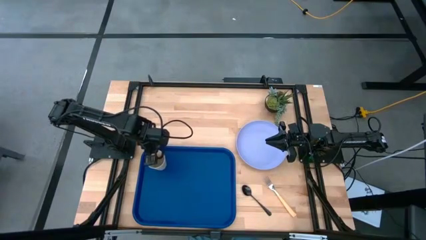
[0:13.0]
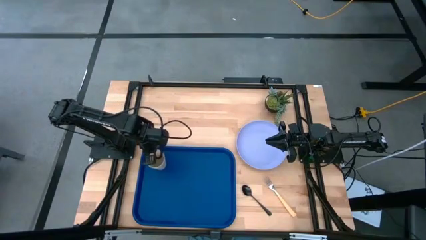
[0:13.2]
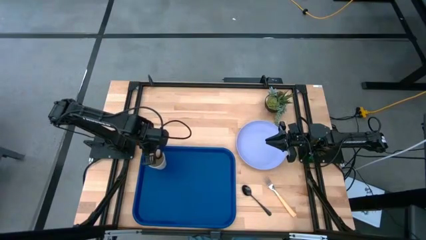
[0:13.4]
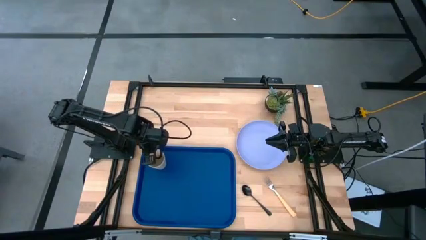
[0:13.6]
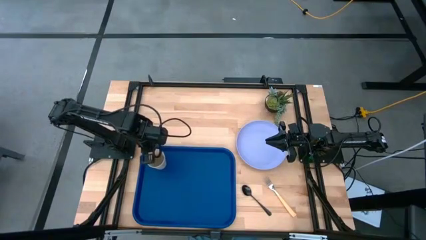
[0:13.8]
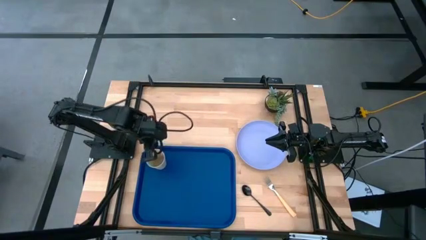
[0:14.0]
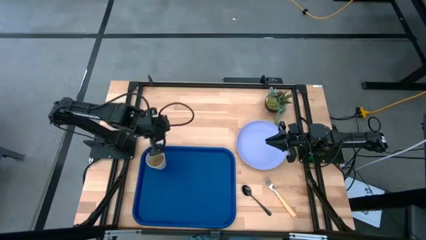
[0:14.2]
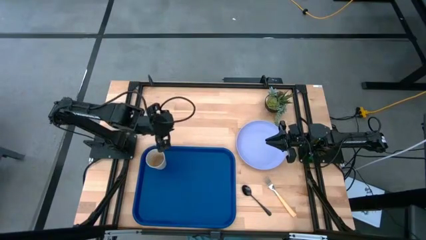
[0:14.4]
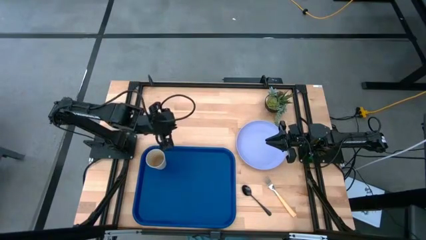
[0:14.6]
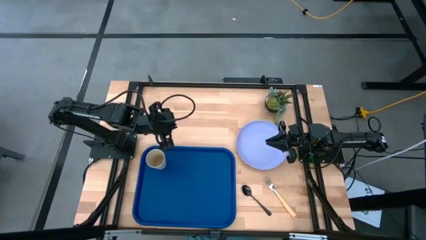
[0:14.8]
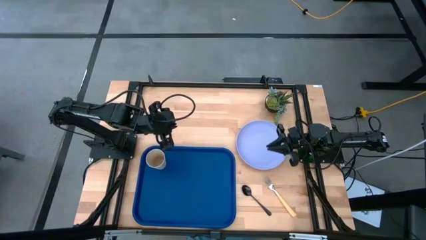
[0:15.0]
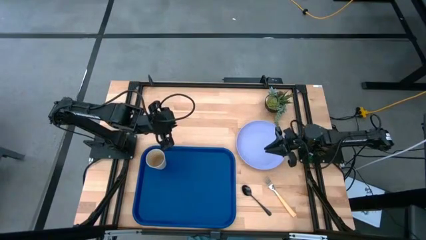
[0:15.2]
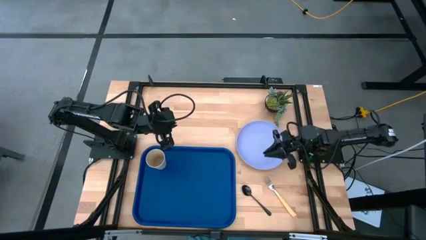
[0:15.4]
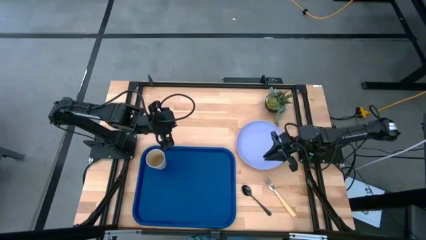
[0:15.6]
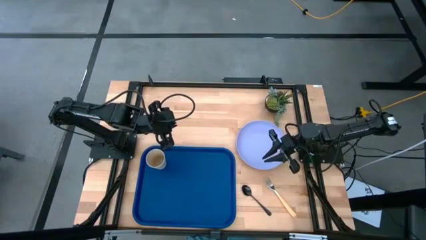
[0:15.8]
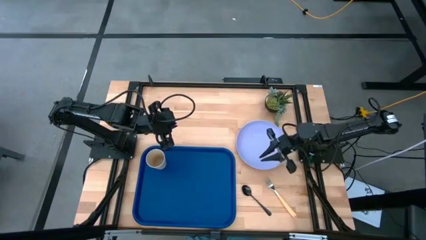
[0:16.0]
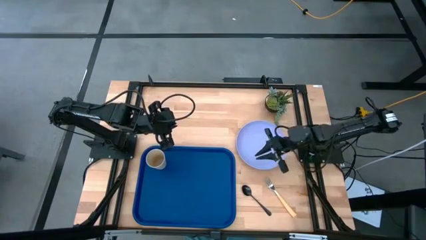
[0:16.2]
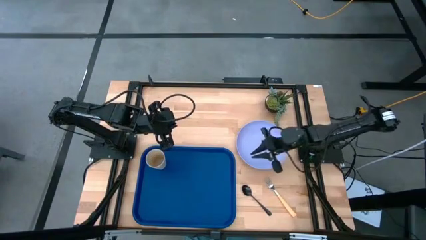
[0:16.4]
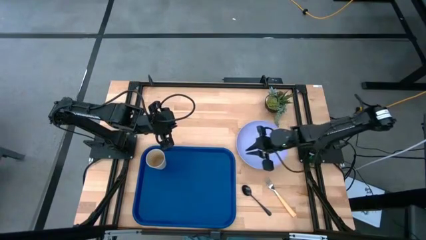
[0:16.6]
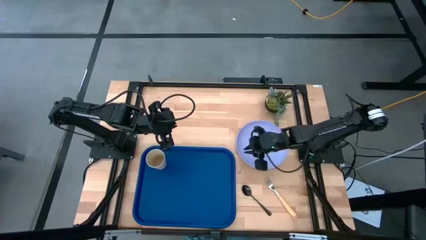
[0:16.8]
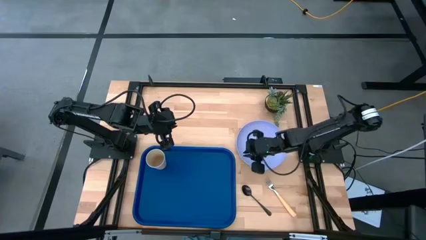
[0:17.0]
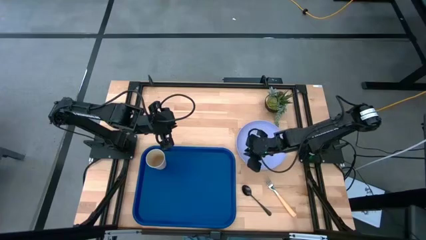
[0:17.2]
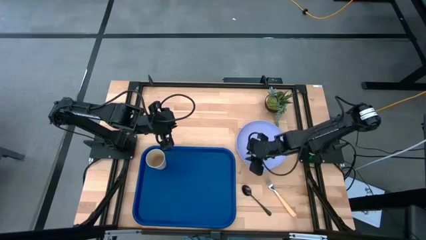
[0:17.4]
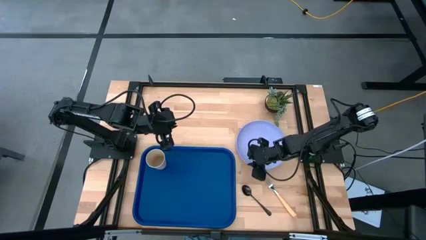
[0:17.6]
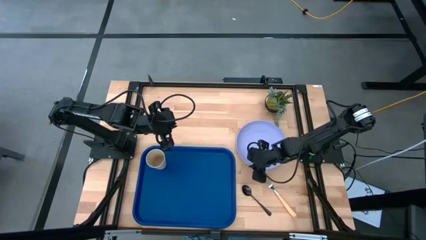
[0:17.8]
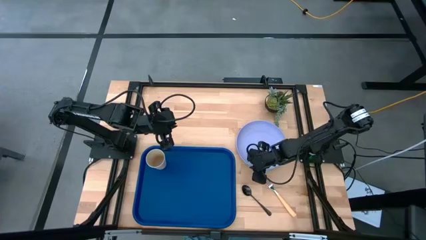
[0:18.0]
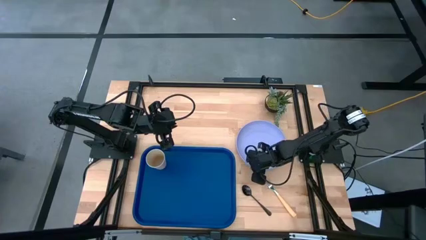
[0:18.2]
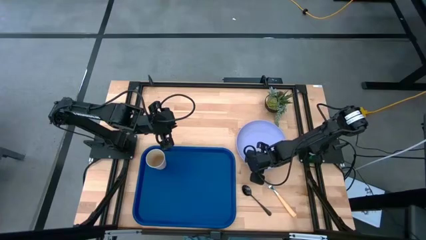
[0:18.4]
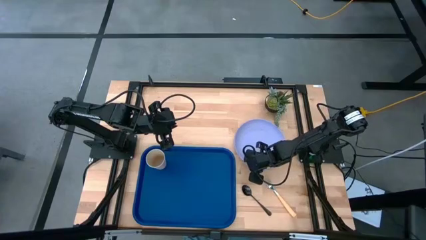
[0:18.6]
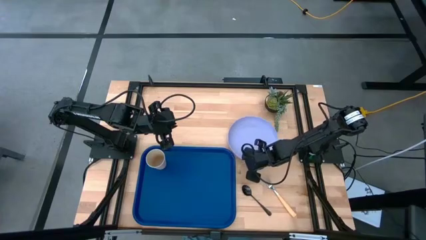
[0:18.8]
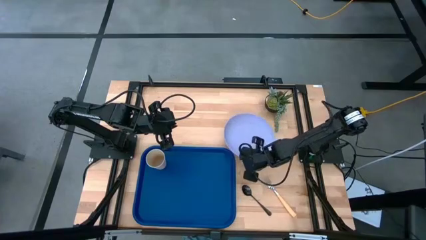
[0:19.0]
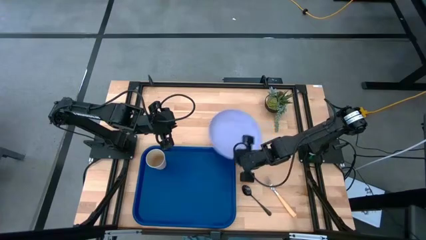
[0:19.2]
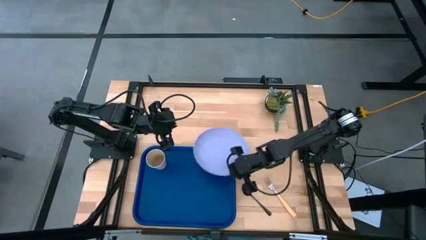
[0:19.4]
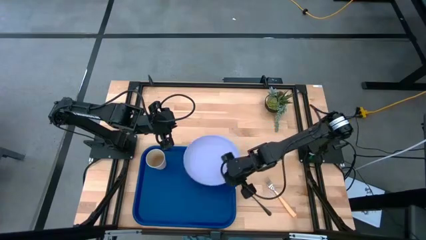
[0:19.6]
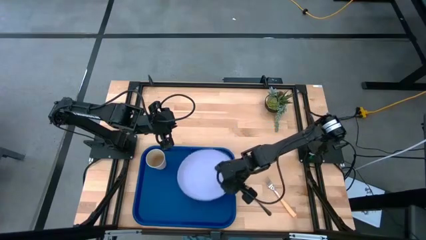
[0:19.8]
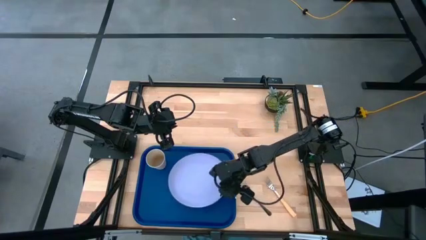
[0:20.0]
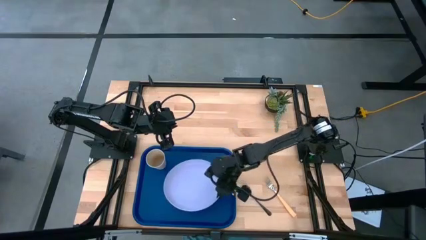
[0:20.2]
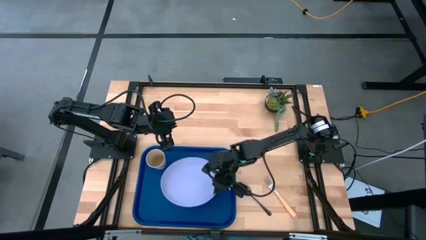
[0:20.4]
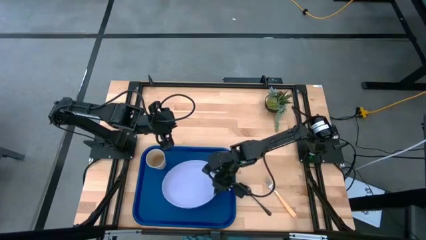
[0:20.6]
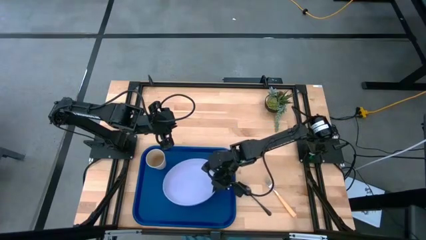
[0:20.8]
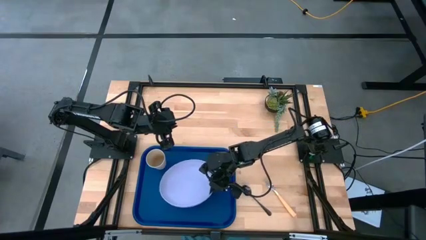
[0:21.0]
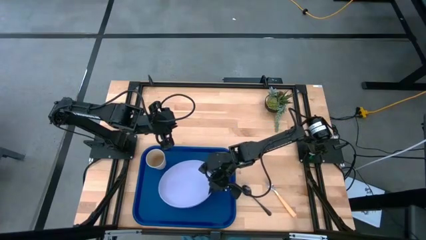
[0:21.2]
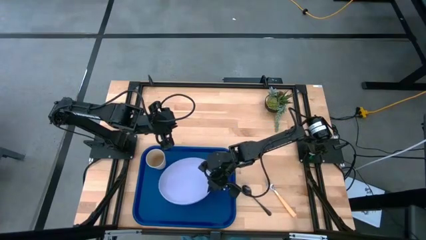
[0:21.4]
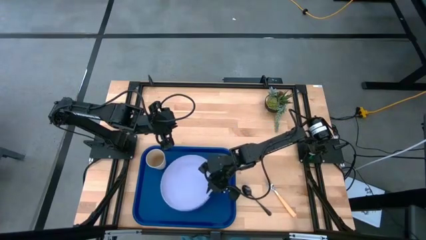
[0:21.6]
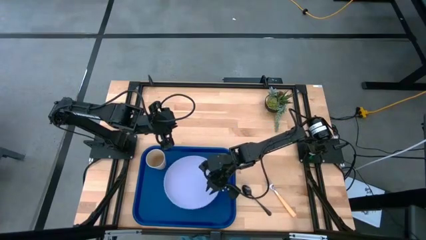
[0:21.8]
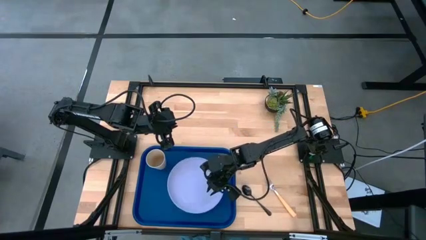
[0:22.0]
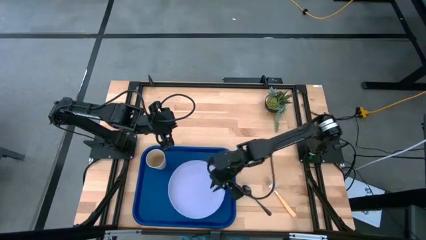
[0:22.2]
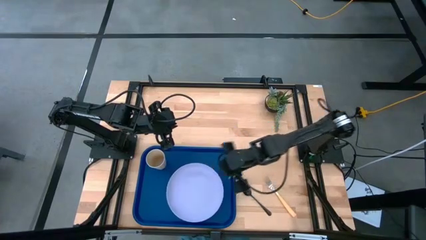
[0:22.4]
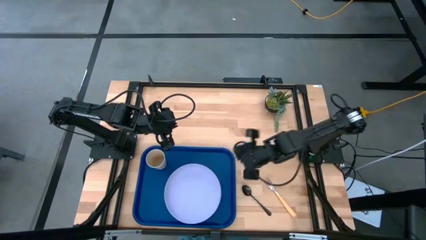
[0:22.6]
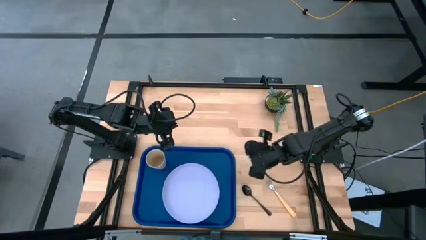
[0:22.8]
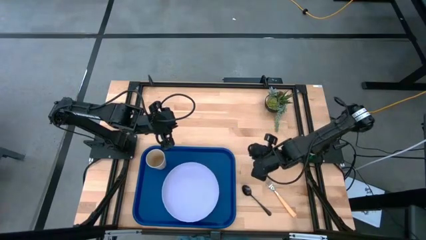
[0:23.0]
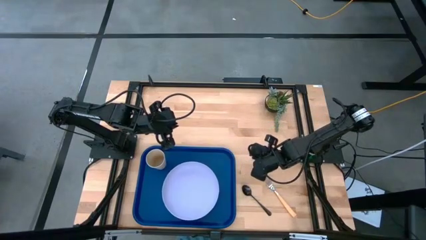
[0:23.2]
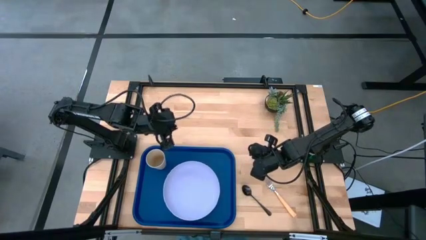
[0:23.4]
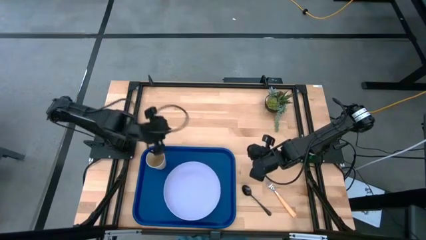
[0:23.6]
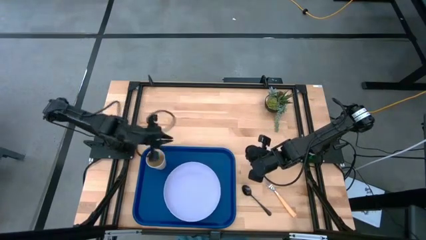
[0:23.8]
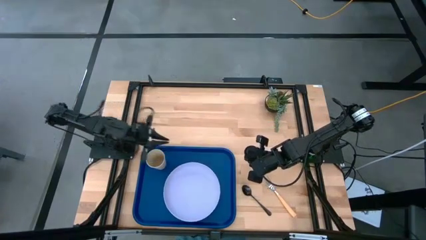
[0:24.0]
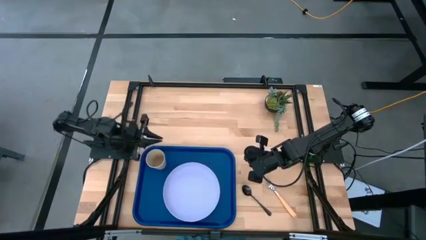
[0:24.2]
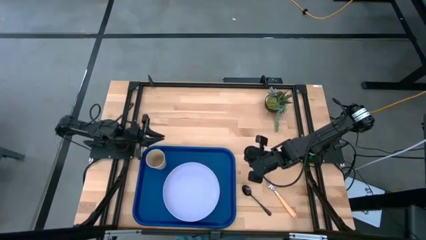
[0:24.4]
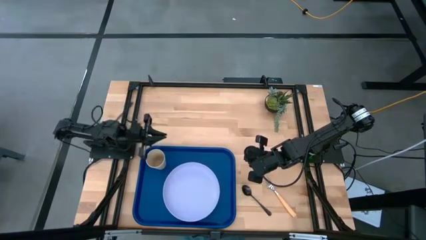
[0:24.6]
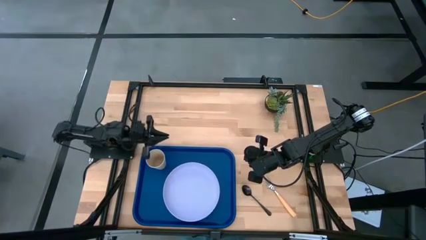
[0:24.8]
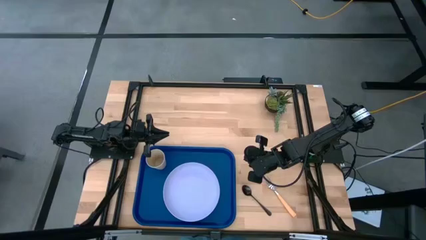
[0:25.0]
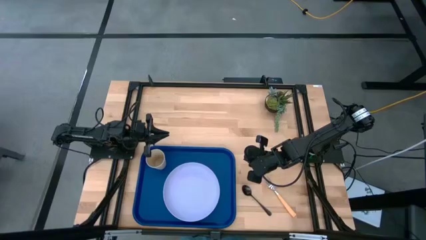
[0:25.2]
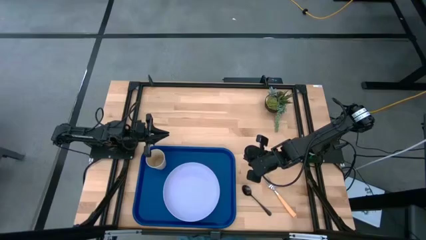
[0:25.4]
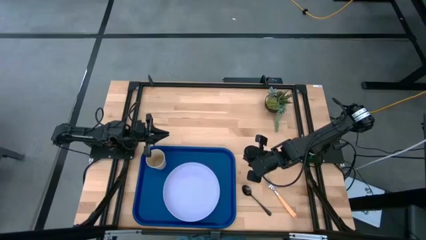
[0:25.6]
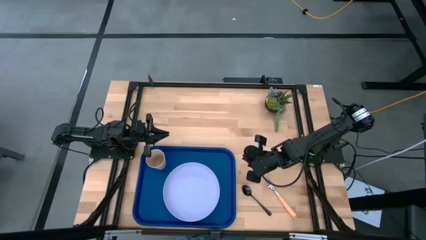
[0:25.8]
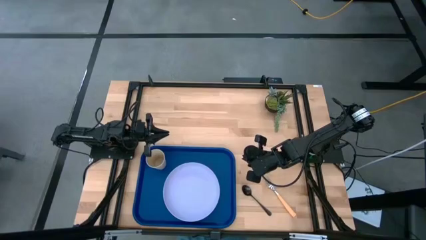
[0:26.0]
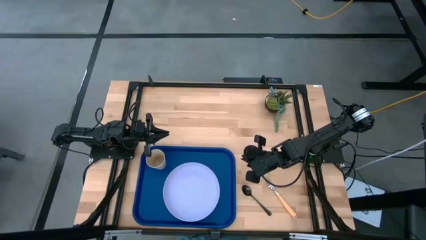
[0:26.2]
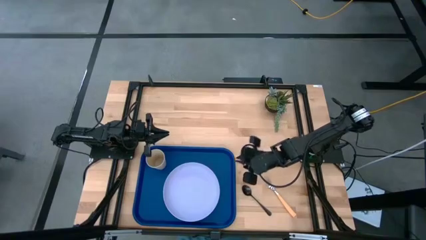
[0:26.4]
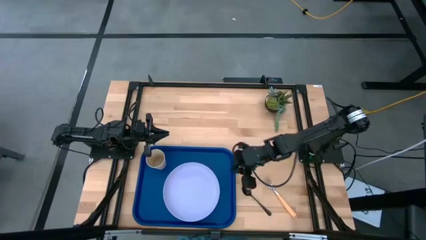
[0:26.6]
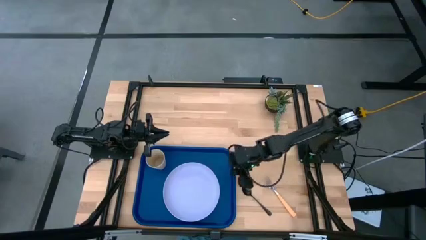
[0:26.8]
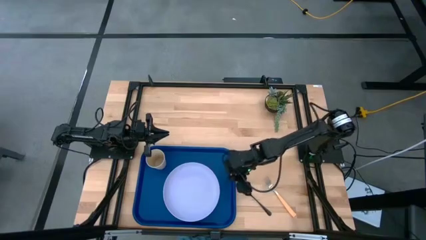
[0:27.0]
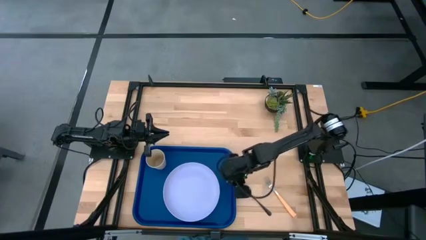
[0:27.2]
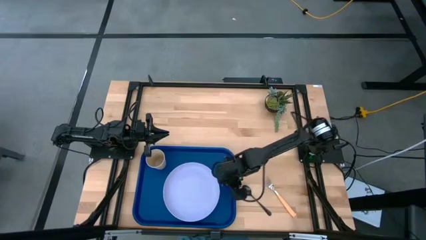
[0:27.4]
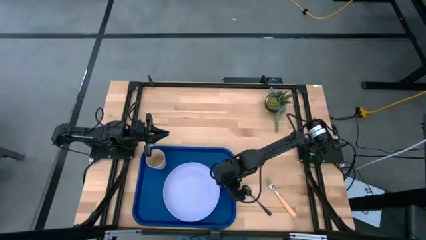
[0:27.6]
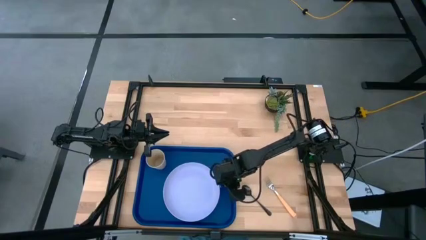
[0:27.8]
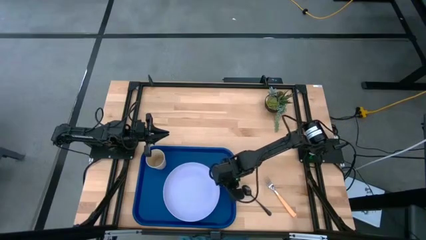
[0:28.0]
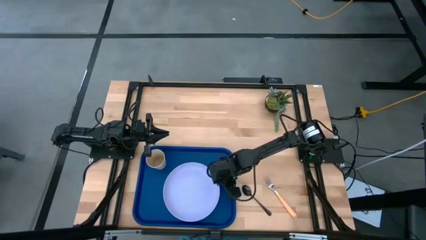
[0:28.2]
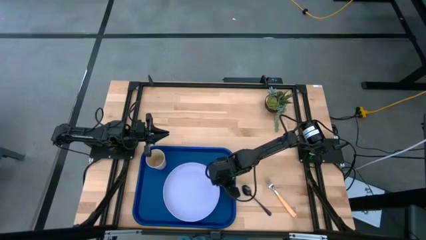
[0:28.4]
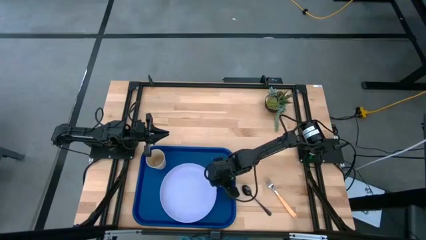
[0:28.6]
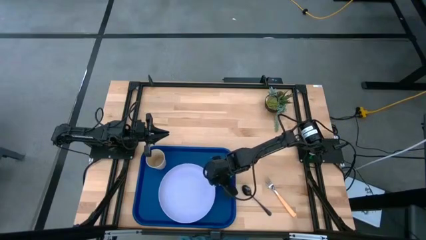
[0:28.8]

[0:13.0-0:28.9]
Task: Pick and place plate/cup/fork/spoon on tray
Put the purple plate on the blue serving tray
